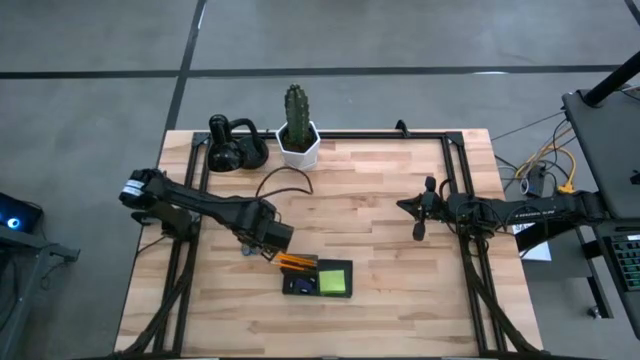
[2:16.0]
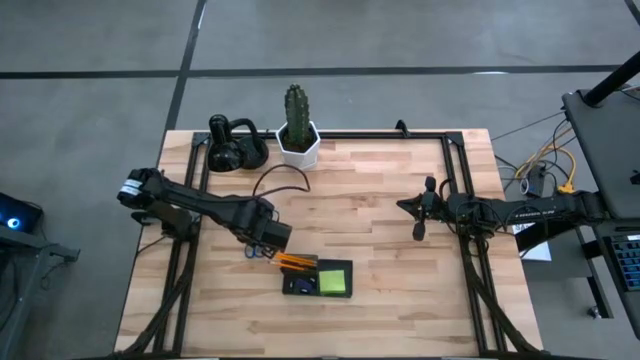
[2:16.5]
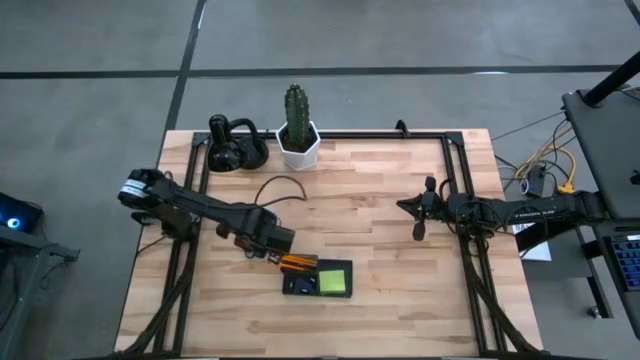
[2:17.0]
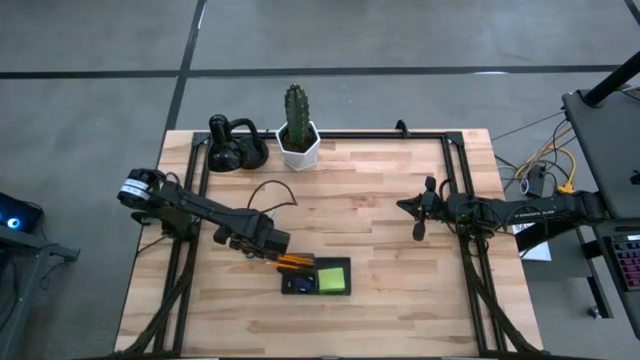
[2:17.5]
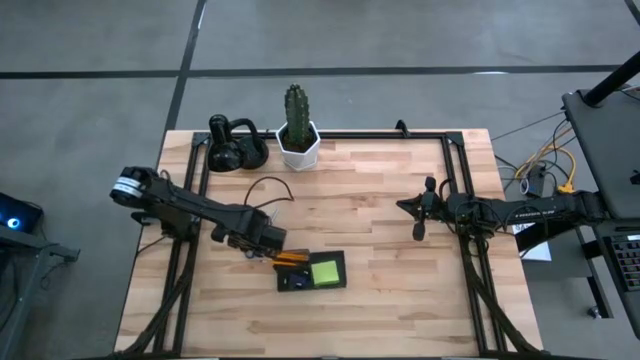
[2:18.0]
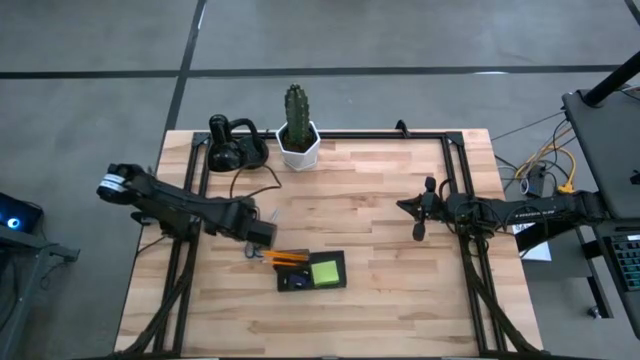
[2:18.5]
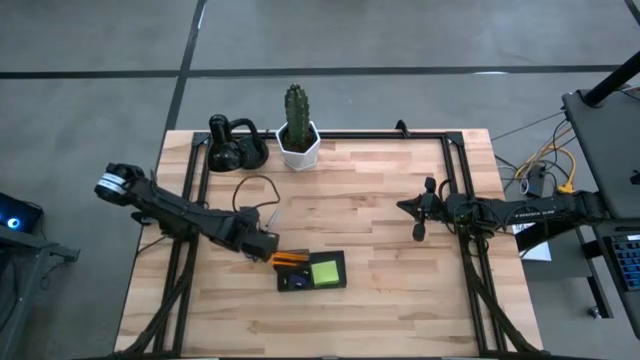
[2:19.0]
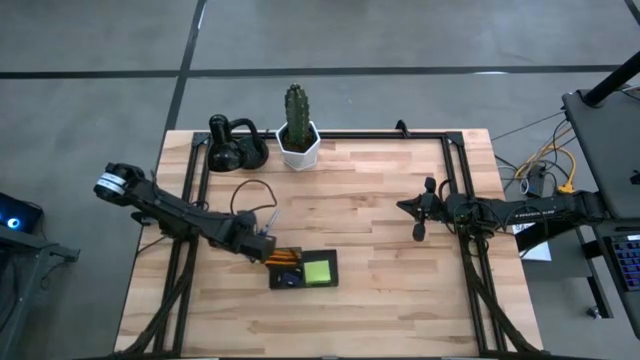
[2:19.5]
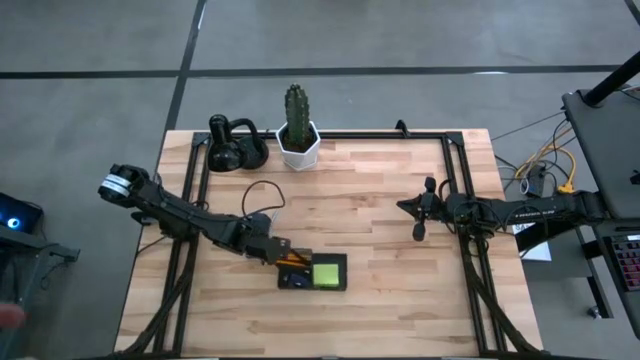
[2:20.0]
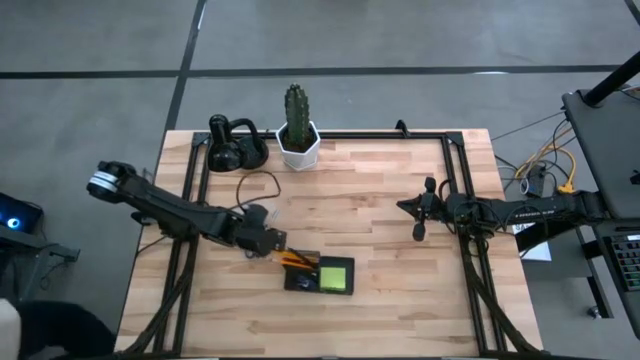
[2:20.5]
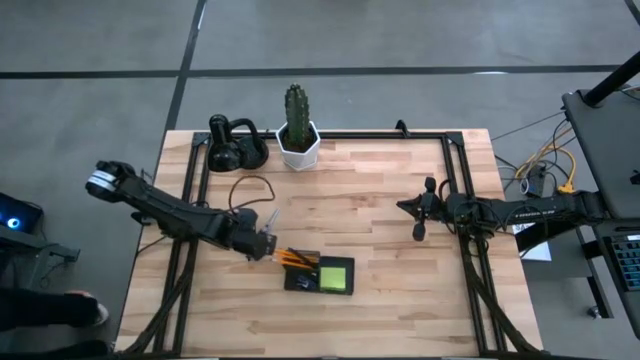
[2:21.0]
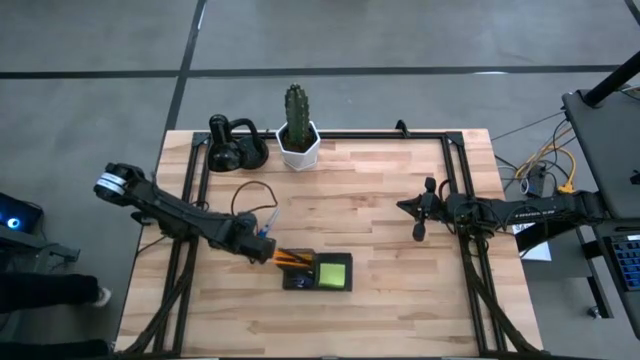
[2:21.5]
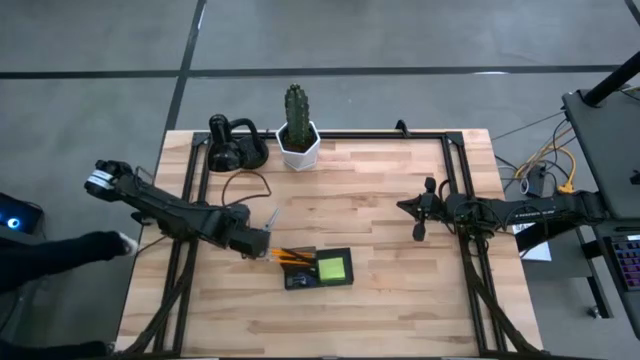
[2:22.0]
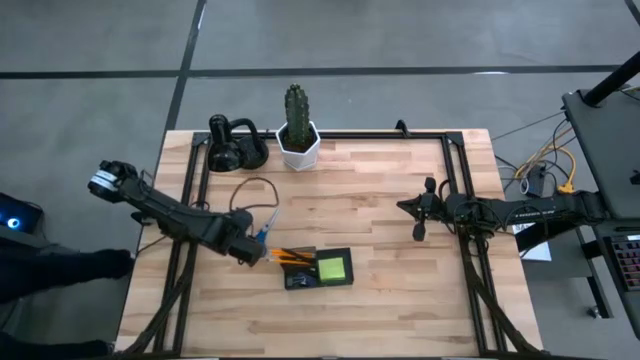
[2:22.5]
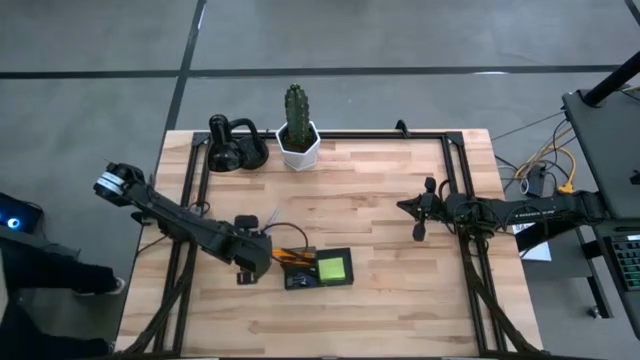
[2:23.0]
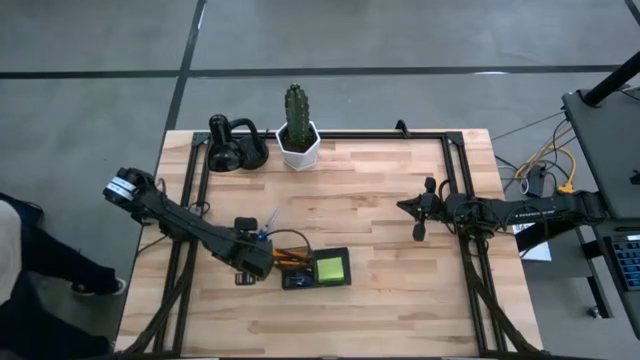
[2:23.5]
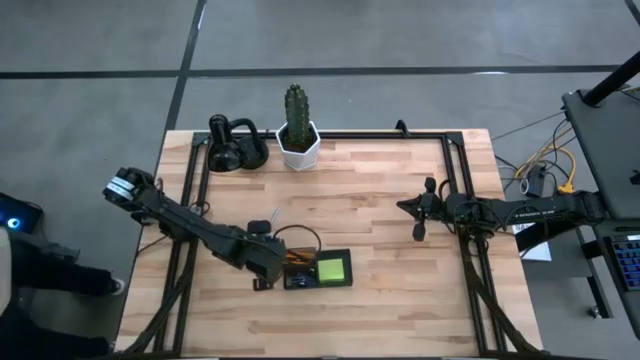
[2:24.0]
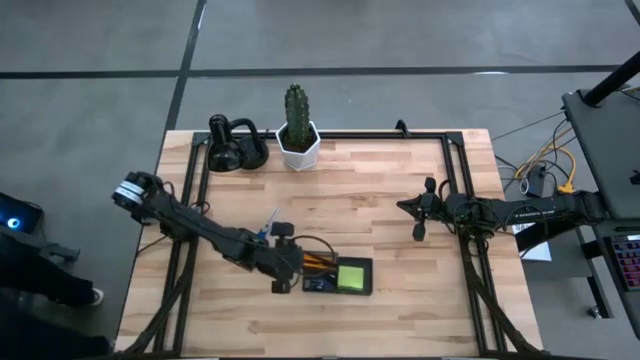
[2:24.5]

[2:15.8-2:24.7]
Task: Pick and place office supplies into organizer
Adjust the desk organizer

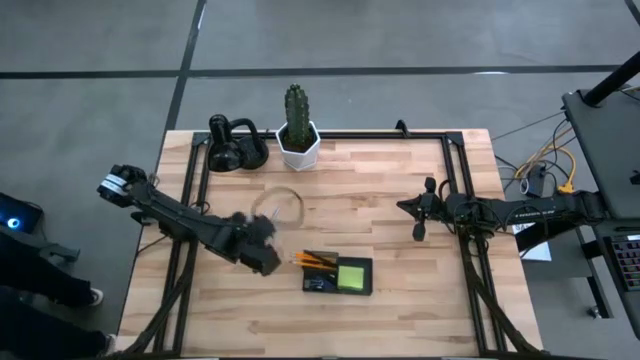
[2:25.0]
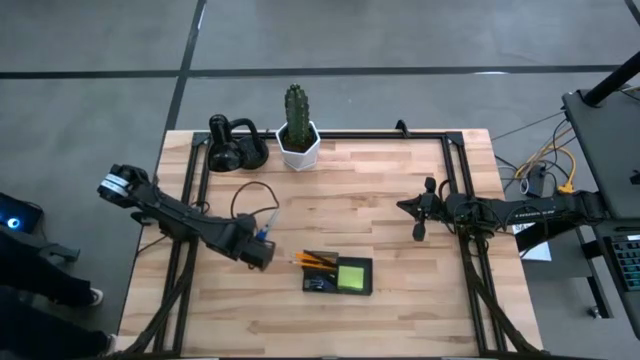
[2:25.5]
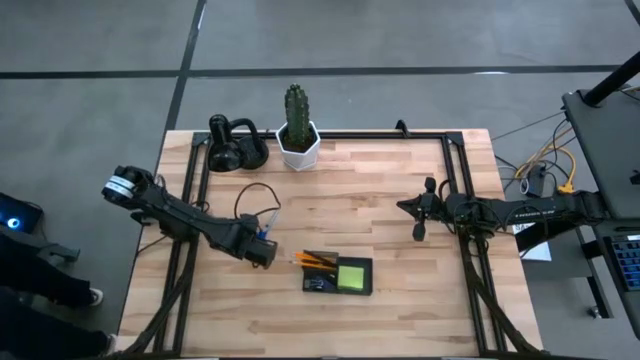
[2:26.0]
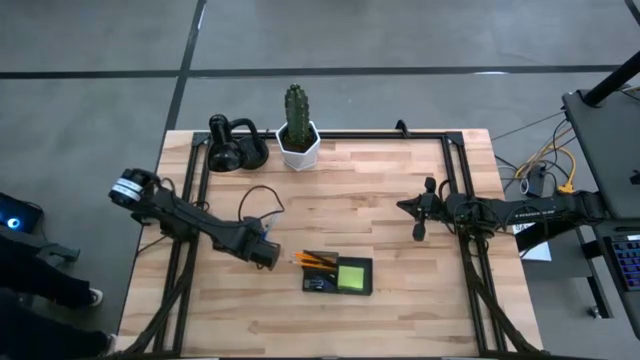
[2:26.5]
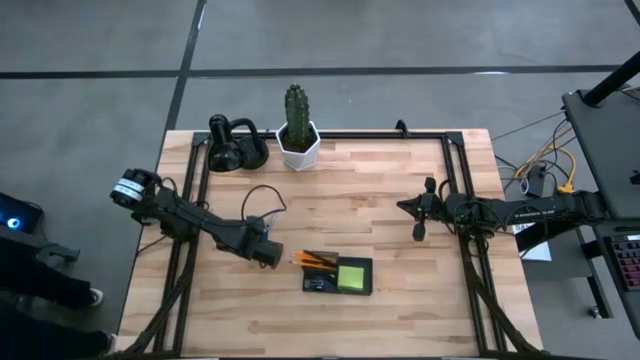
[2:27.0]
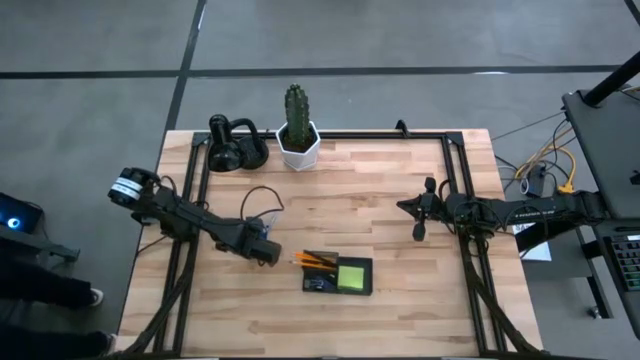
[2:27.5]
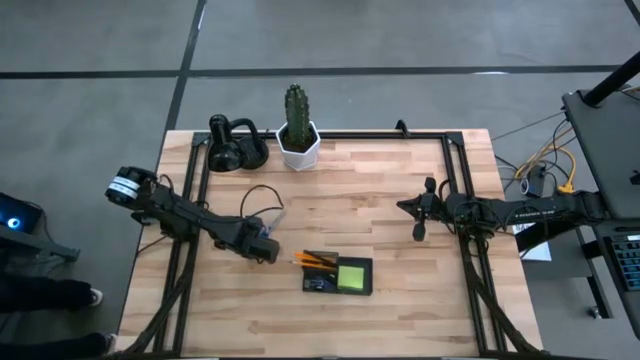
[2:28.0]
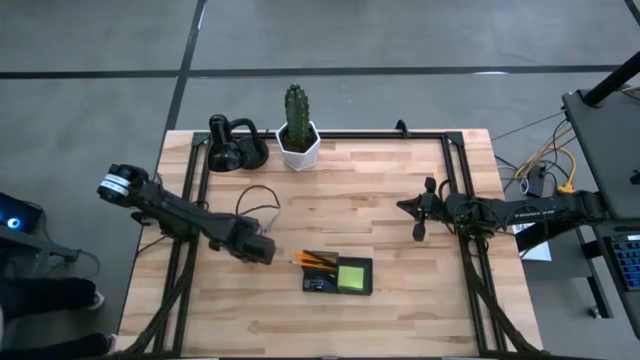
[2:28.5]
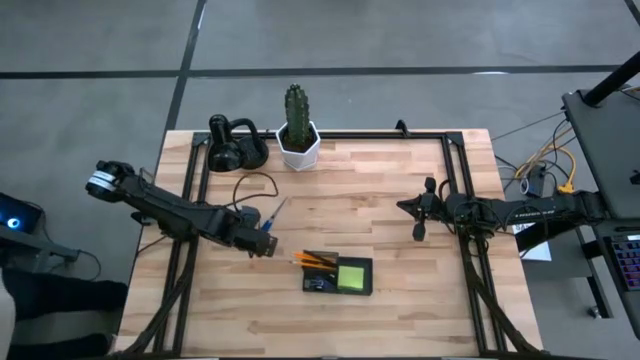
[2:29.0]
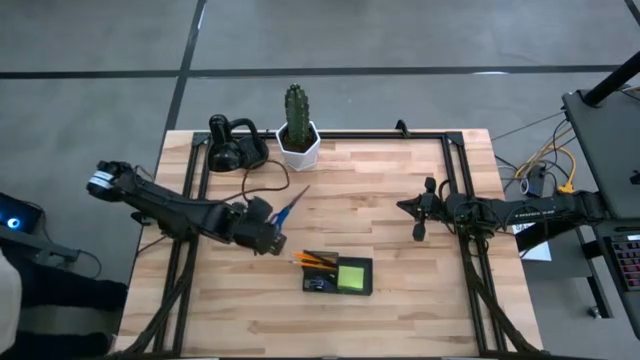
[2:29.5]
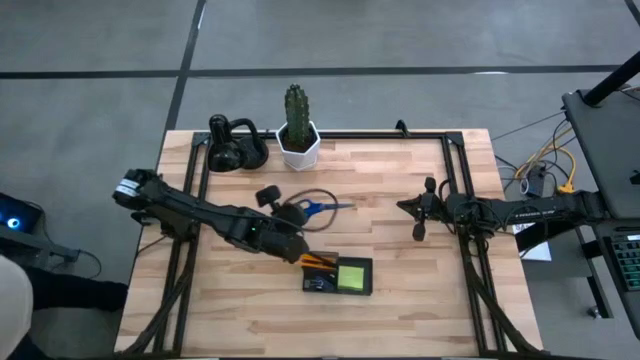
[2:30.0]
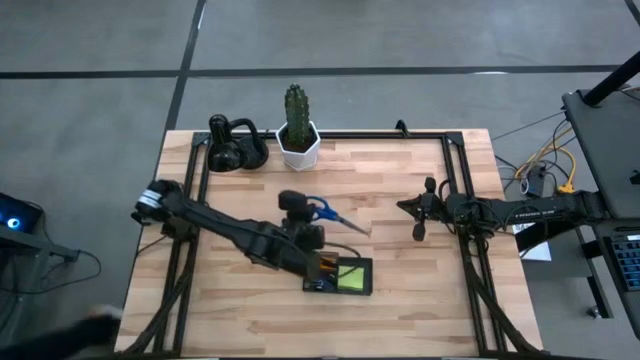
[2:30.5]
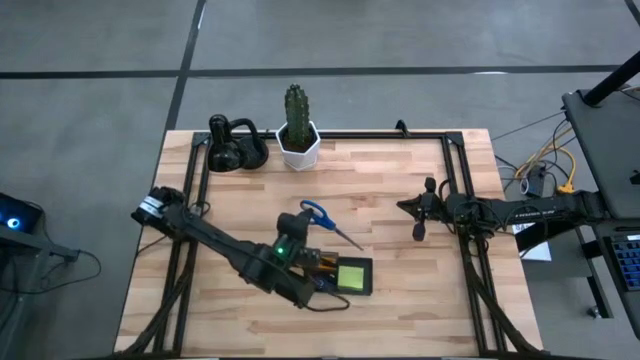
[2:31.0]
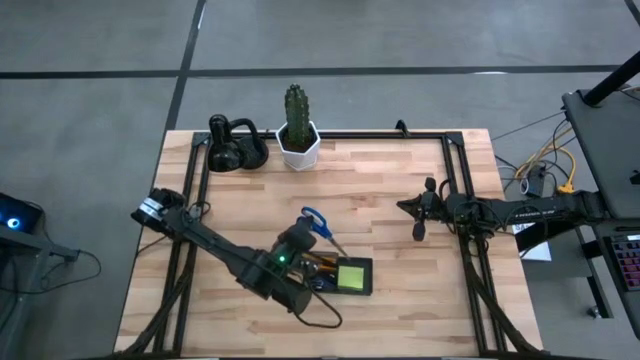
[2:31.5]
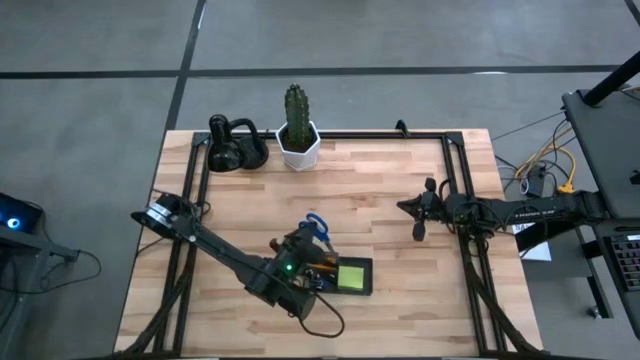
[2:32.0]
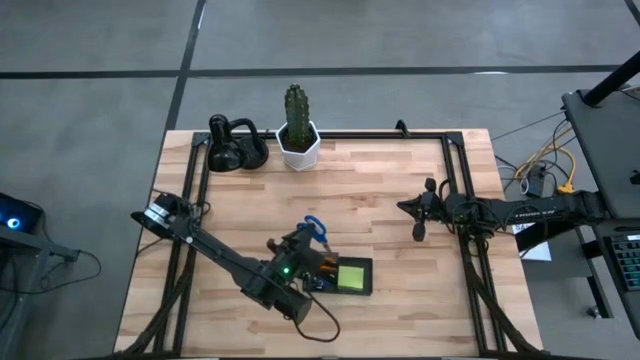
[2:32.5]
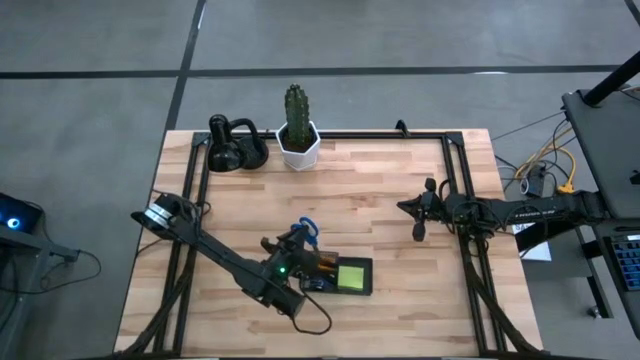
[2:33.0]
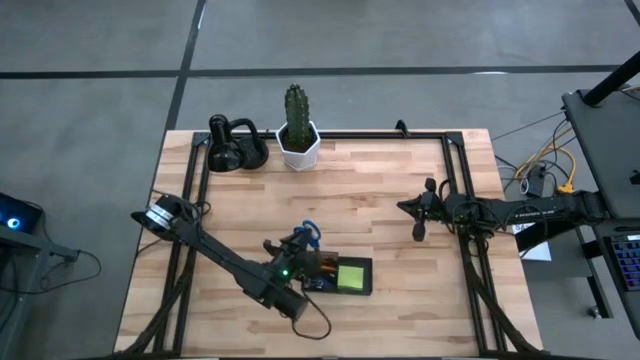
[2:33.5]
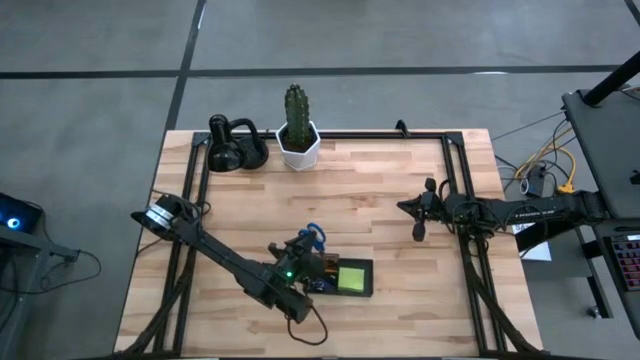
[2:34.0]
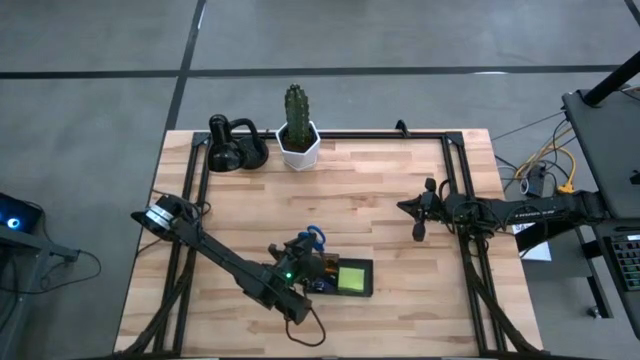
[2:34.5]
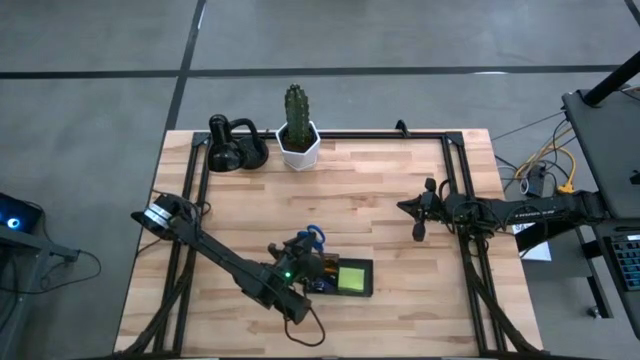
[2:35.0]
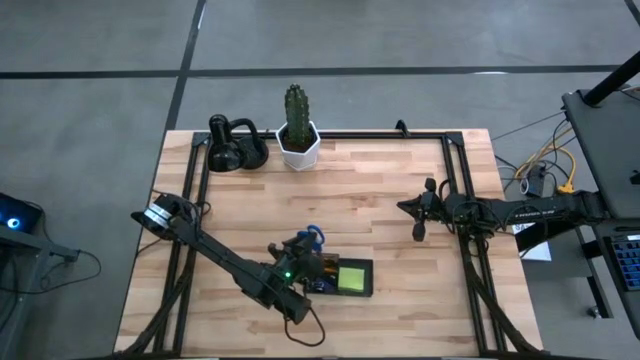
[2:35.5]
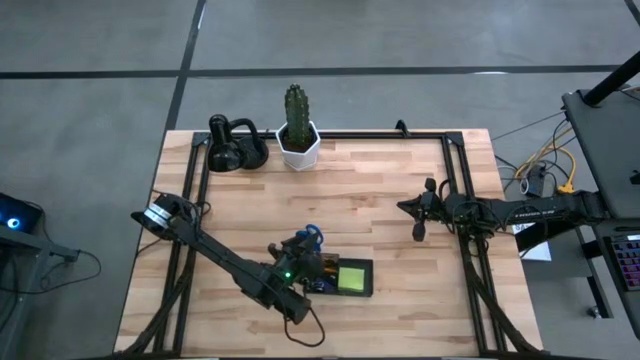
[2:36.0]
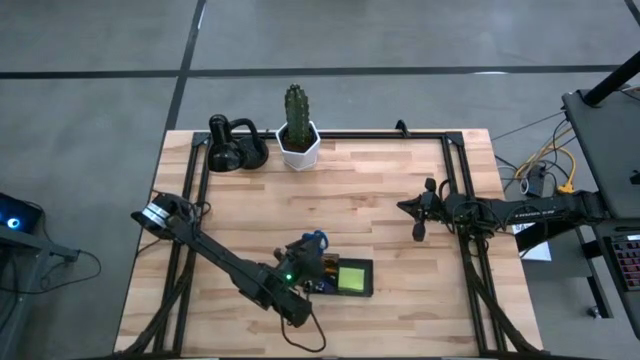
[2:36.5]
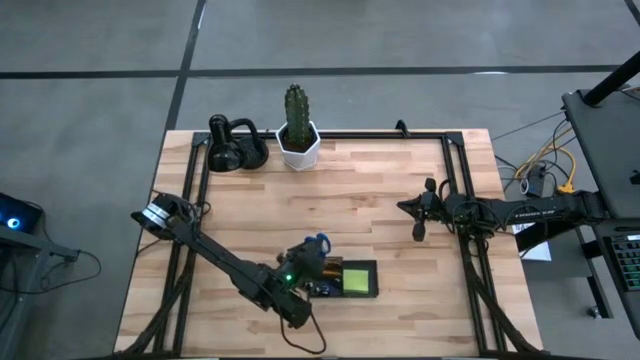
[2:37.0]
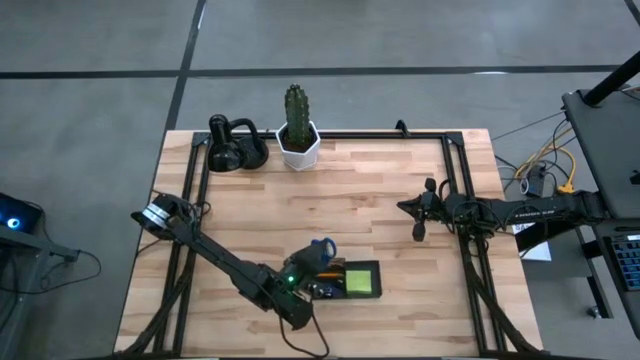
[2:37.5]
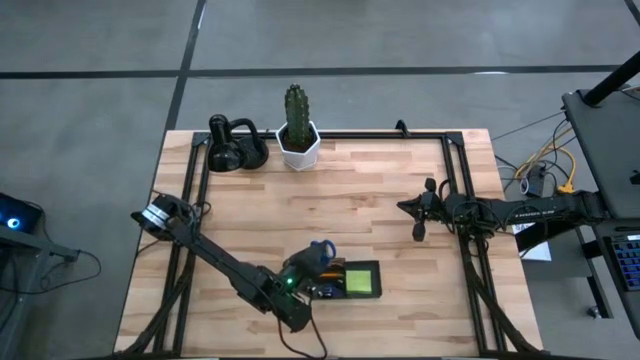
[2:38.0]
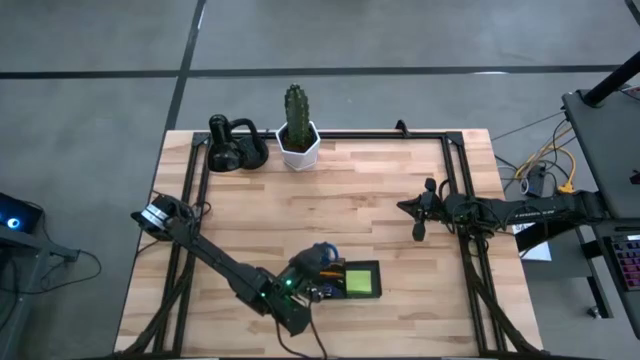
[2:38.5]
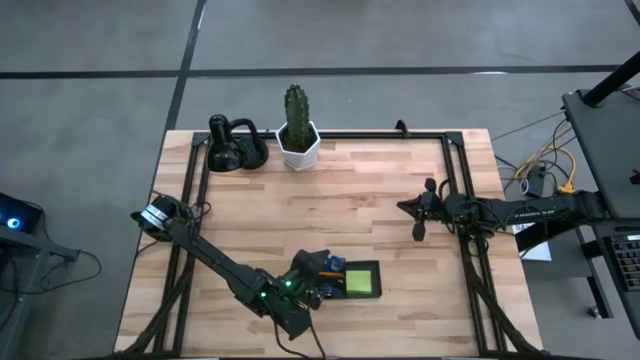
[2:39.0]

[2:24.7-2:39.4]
Put the blue scissor into the desk organizer
